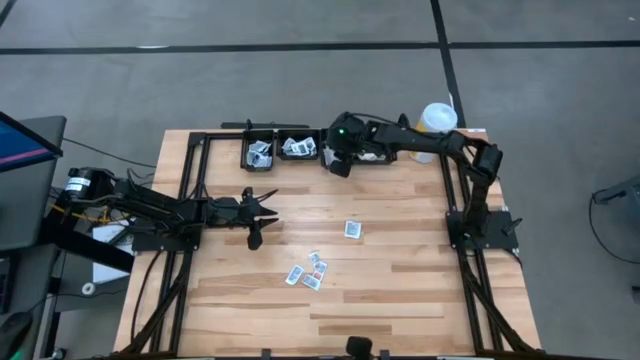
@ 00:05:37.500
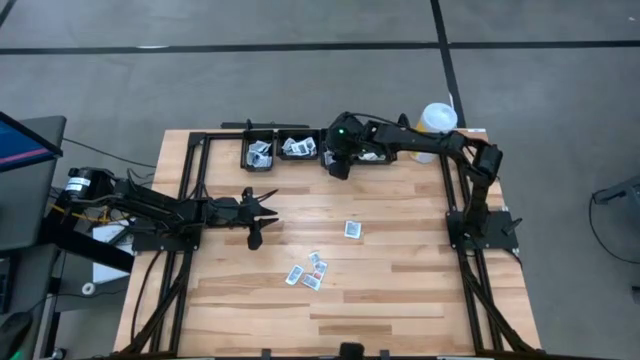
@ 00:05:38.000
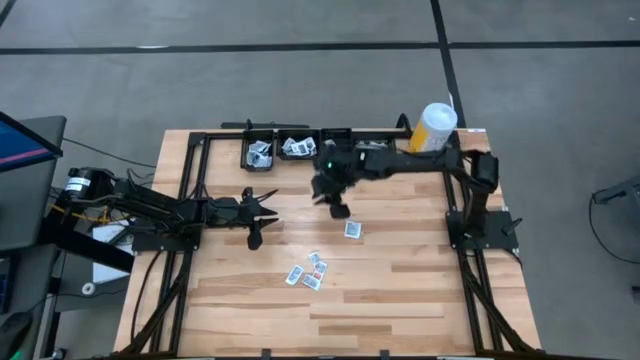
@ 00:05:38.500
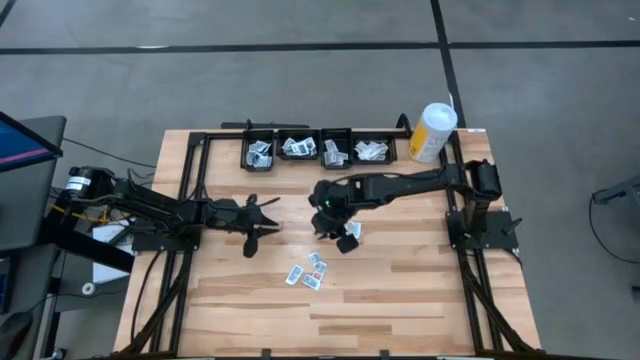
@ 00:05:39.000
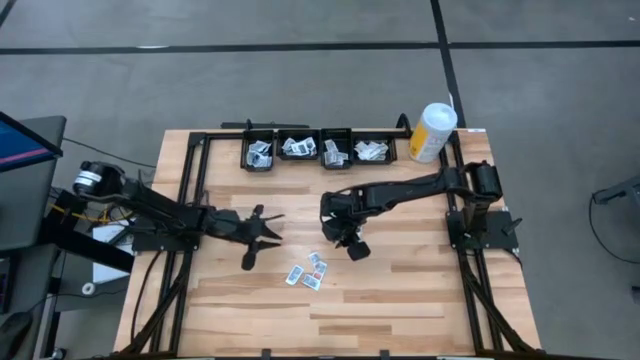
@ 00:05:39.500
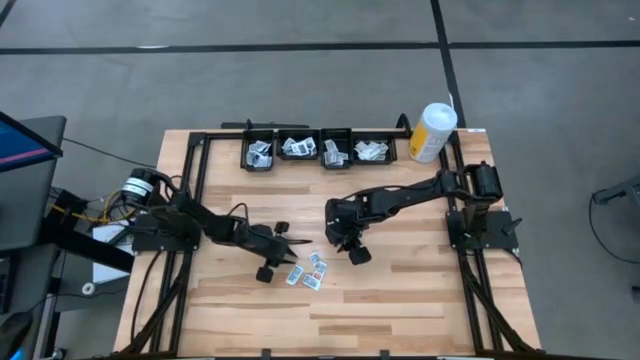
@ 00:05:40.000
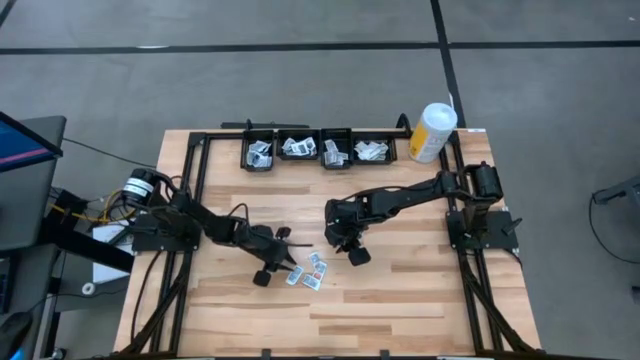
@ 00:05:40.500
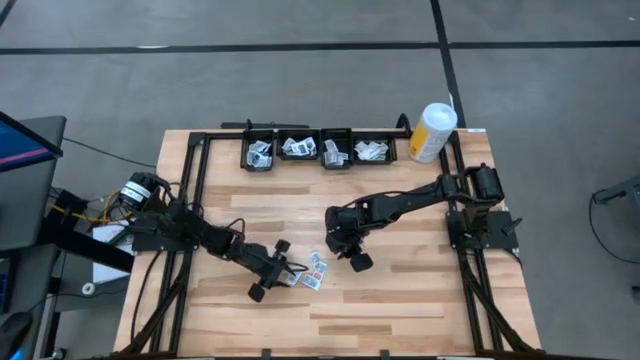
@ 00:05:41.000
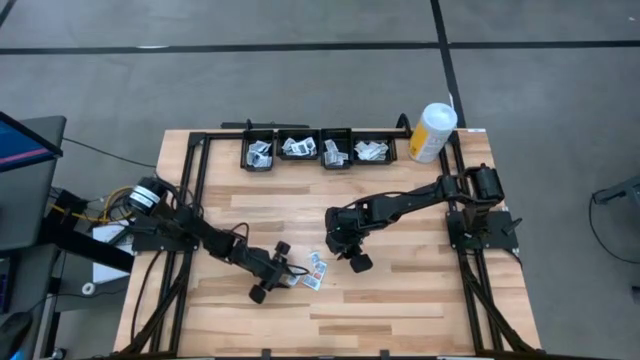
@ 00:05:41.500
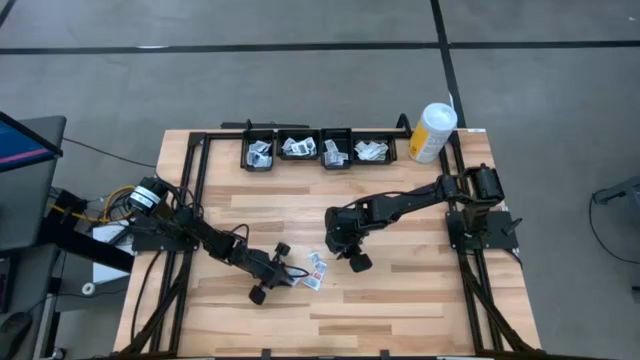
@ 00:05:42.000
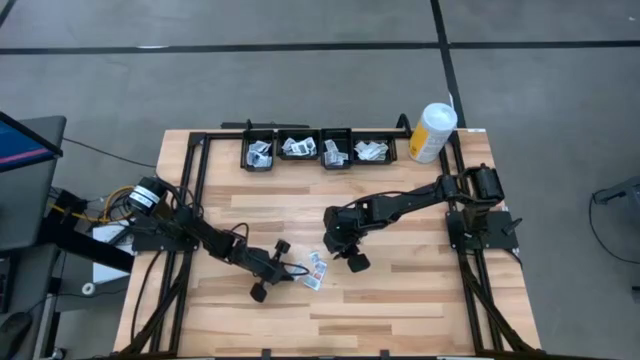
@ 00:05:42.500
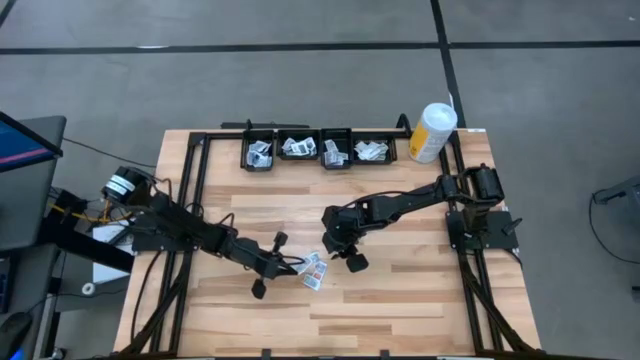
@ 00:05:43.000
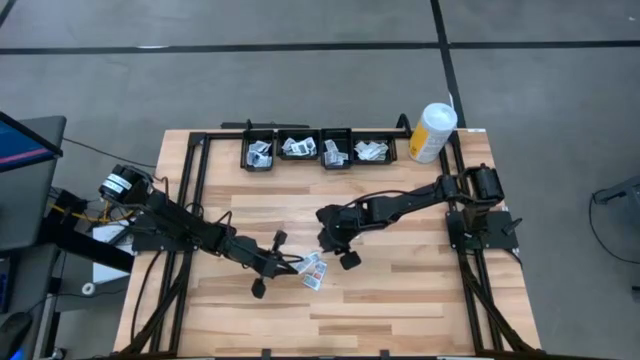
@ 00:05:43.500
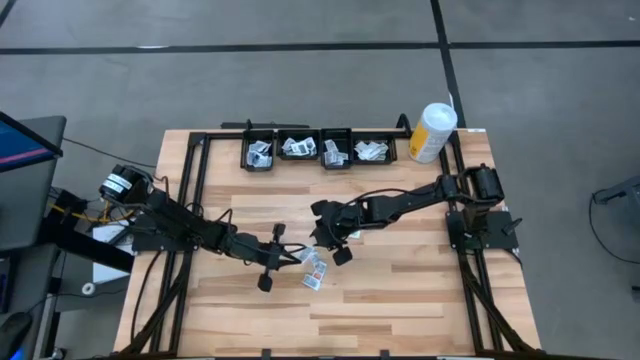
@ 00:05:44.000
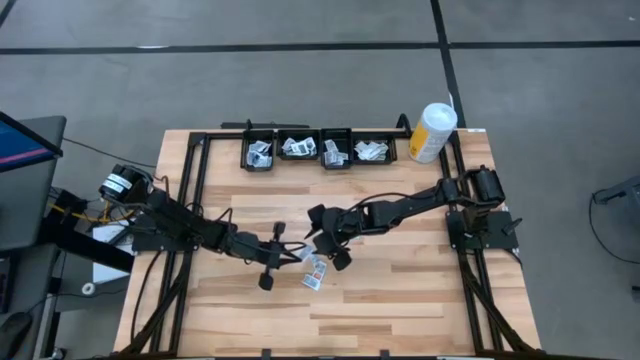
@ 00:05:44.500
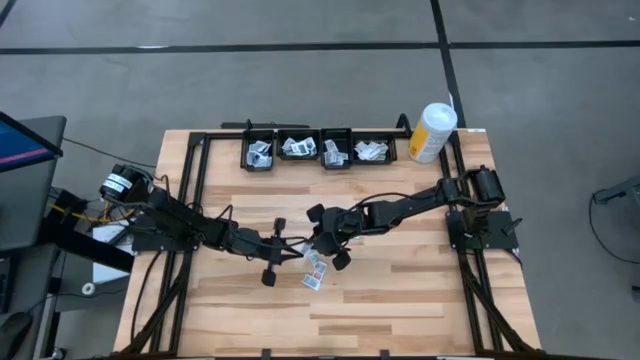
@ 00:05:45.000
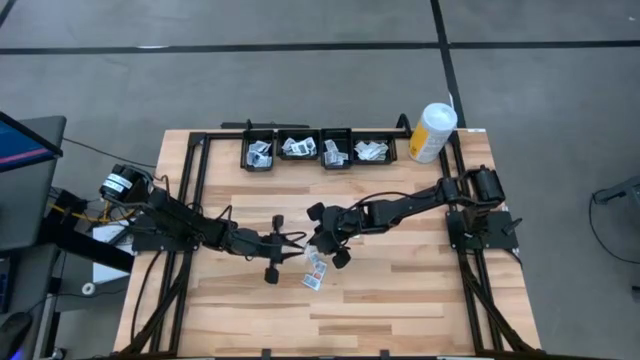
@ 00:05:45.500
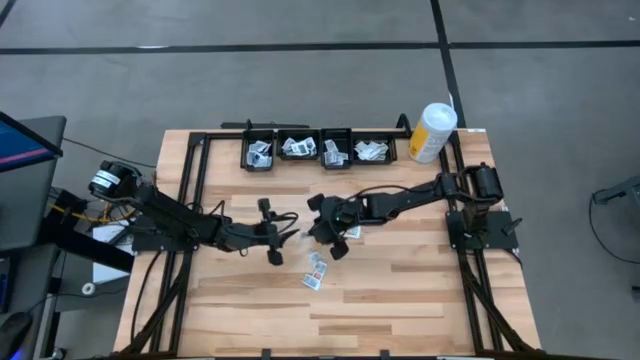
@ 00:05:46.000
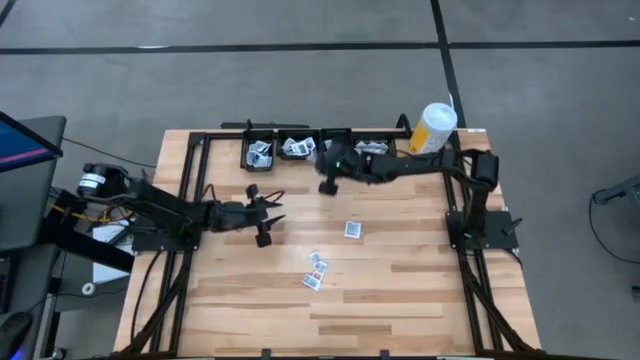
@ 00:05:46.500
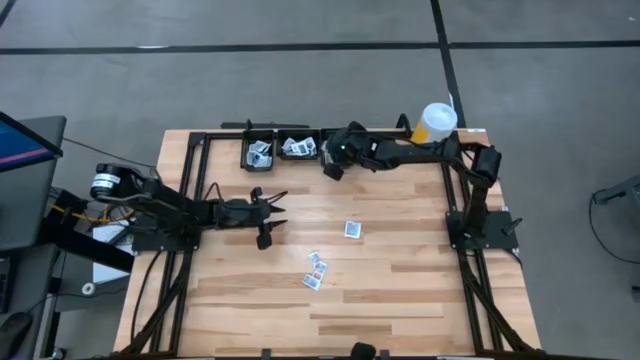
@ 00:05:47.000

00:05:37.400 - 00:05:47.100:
Task: Pick & Place First Aid Supplies
Put the orange ointment pack into the middle right black bin

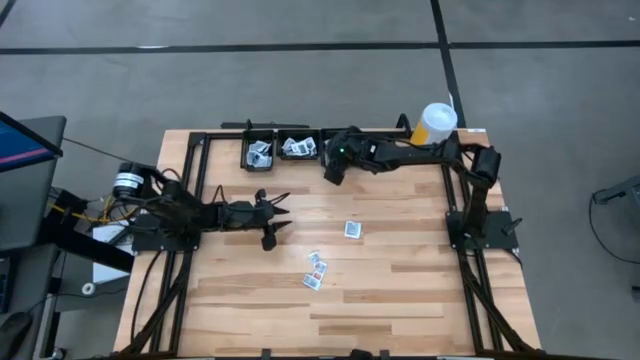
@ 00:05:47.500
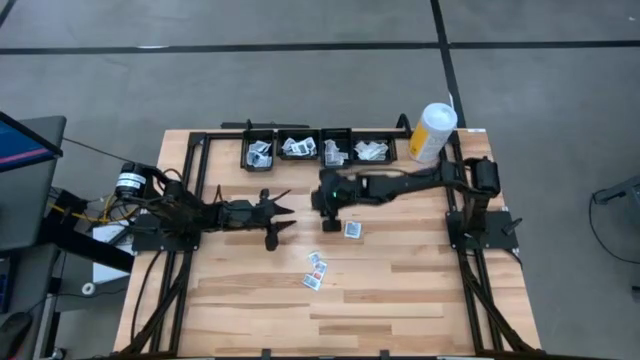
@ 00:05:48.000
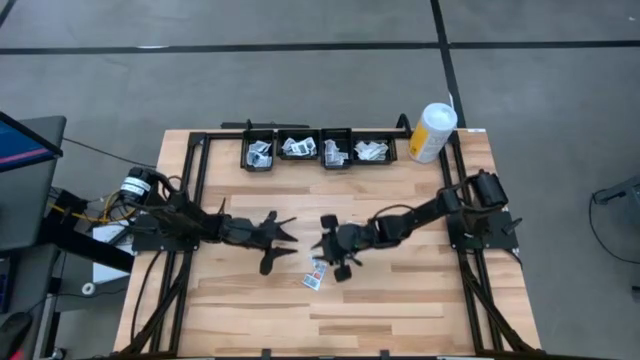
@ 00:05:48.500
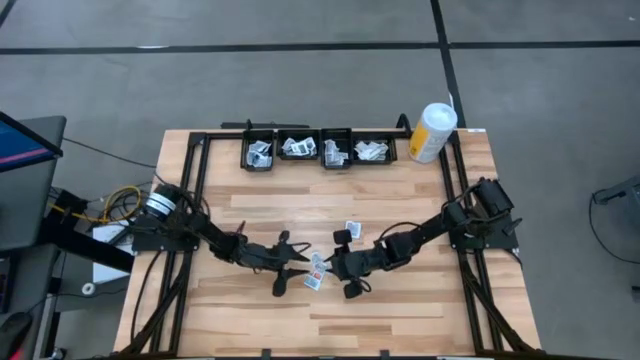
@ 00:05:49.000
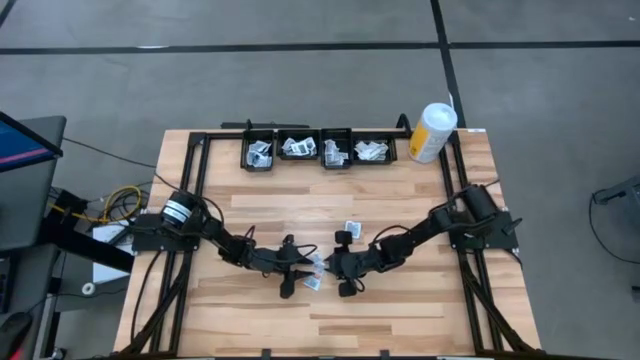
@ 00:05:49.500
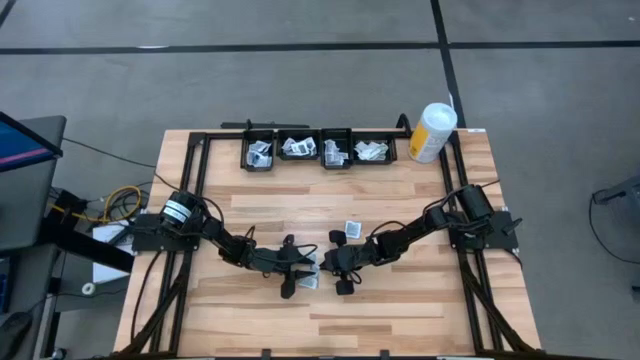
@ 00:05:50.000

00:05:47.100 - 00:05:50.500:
Put the orange ointment pack into the middle right black bin

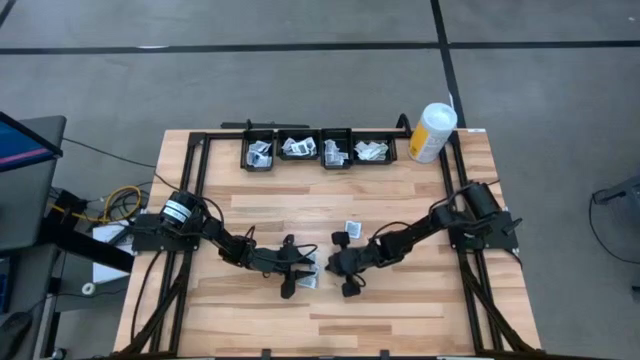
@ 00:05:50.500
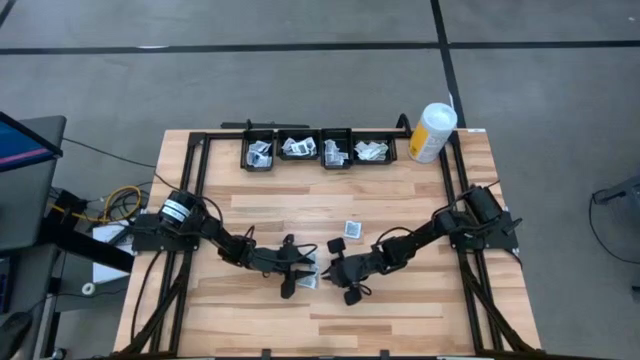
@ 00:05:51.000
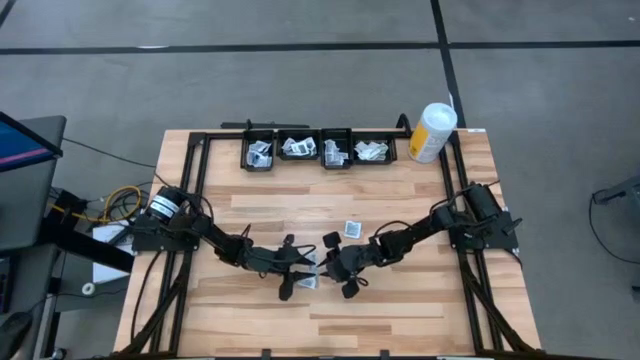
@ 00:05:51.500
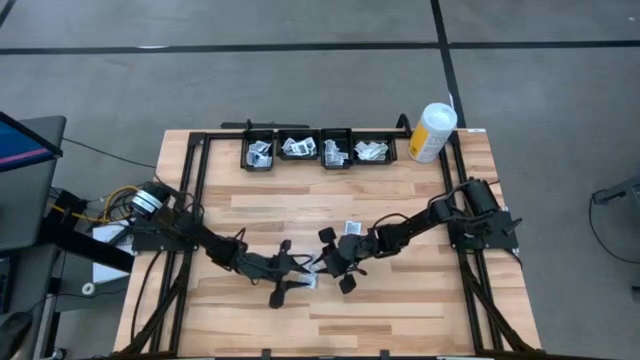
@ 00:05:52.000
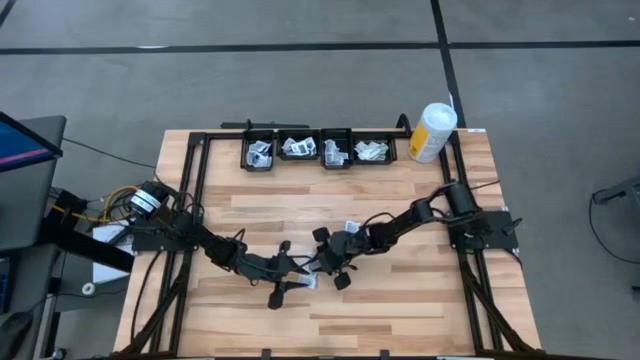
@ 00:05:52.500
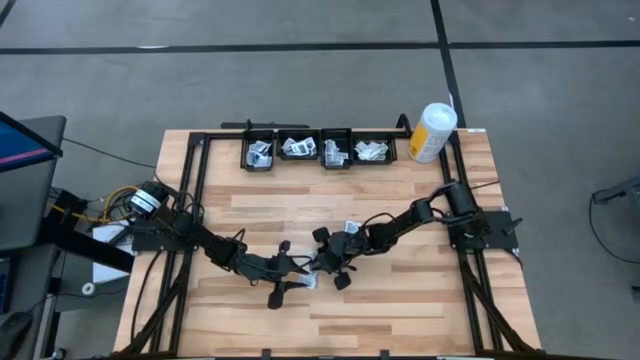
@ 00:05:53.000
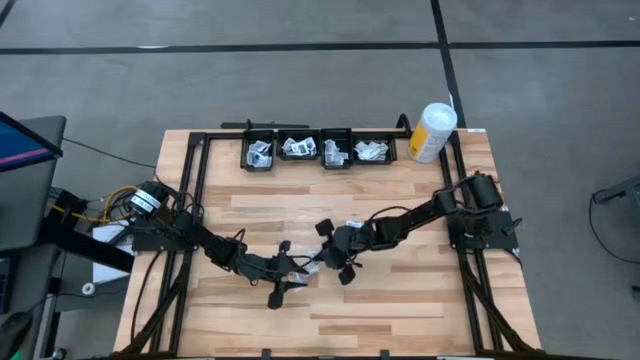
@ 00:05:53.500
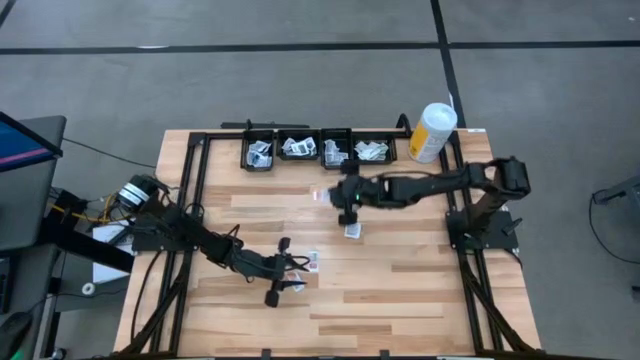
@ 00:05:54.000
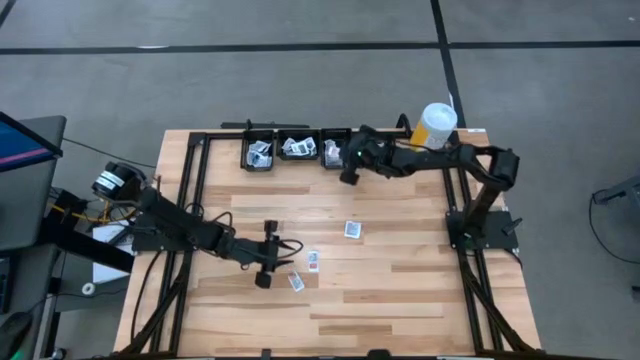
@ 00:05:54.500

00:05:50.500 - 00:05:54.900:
Put the orange ointment pack into the middle right black bin

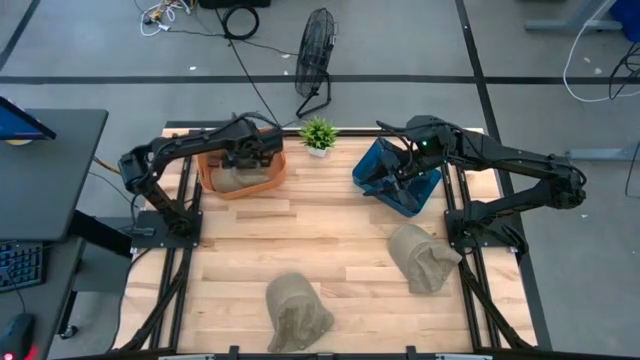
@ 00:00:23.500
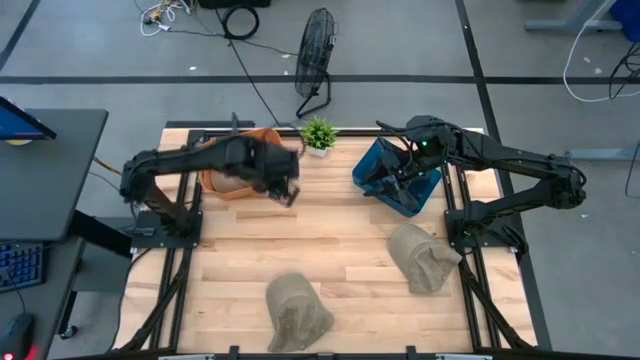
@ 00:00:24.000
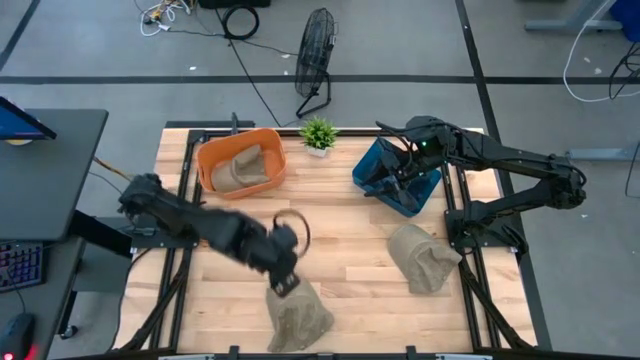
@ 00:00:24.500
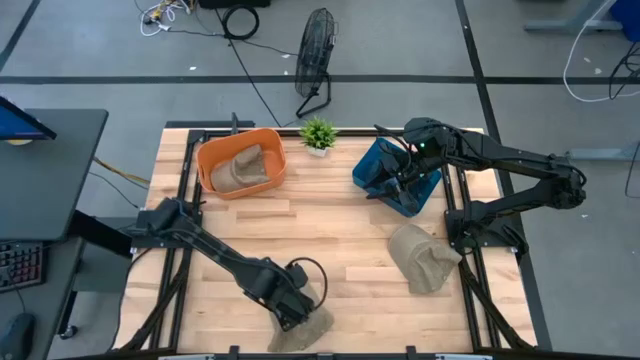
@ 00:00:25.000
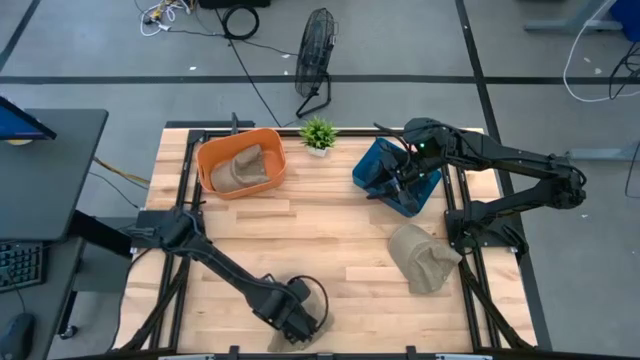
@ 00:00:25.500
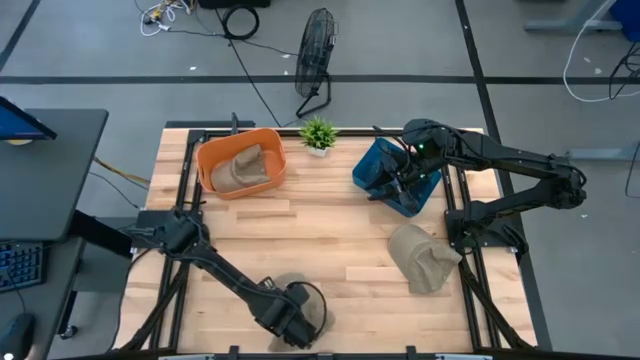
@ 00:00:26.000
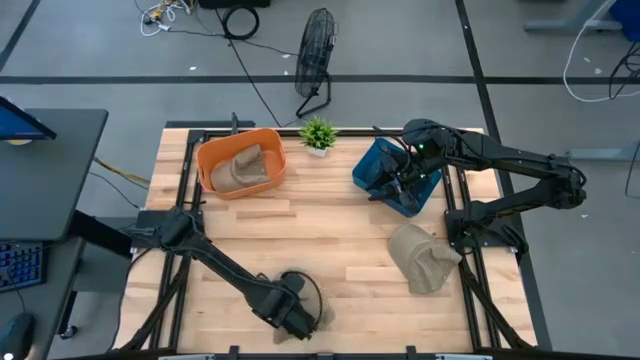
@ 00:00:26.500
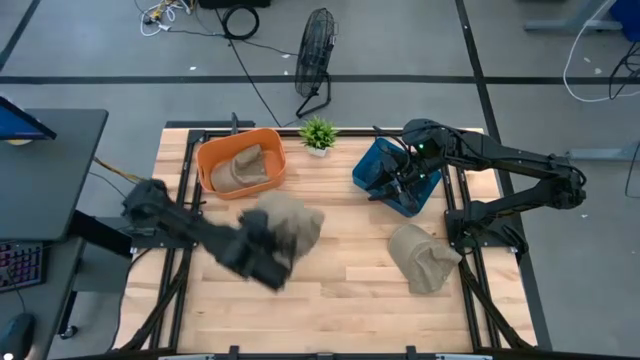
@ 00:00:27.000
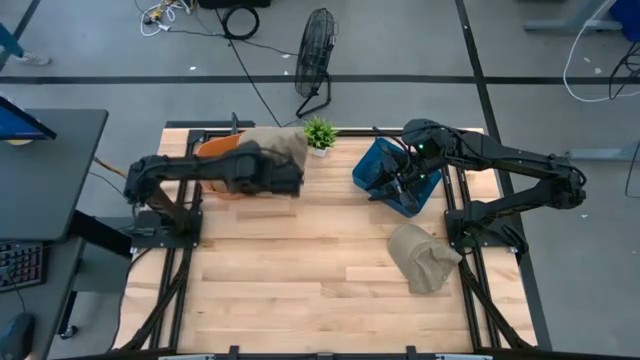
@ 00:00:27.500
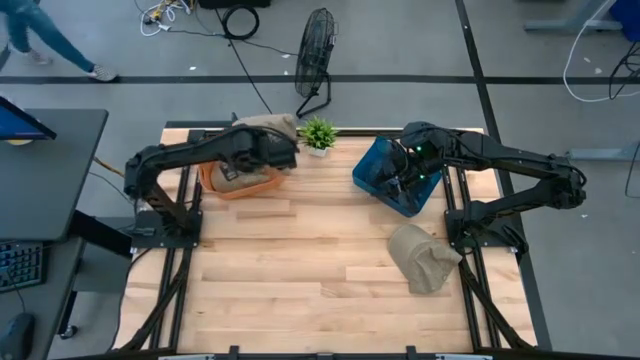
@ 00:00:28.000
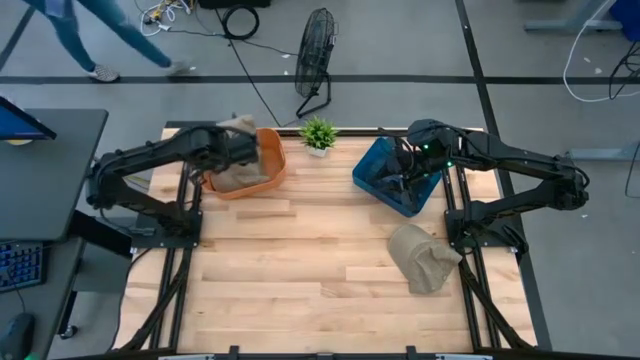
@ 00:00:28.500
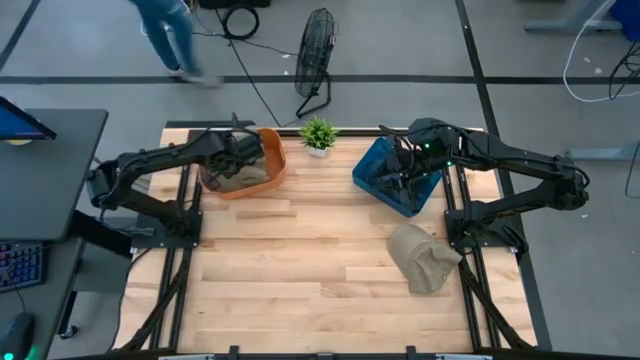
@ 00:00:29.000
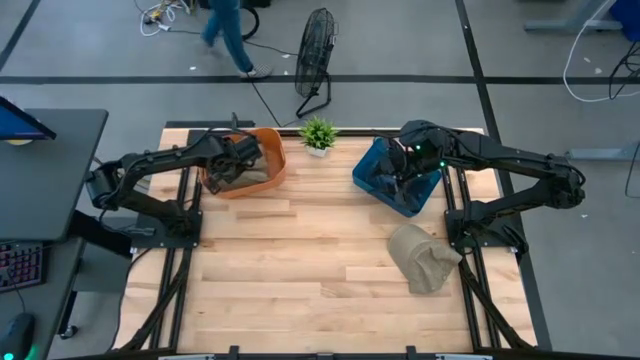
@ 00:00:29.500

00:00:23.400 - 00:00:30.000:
Task: Pick & Place hat
Put the left brown cap into the orange bin
